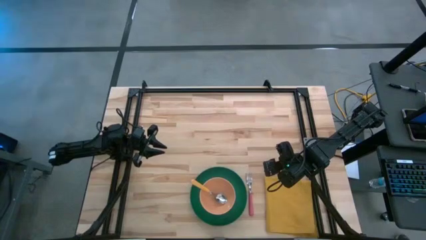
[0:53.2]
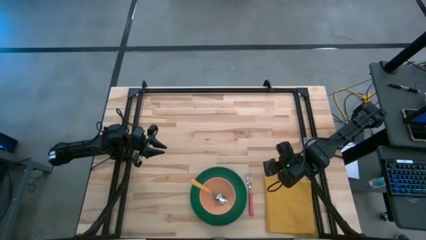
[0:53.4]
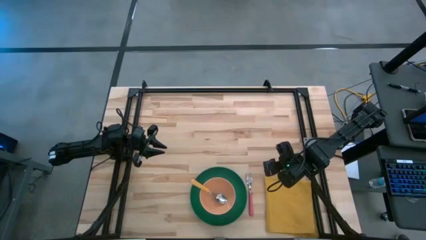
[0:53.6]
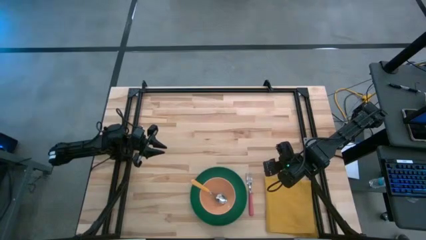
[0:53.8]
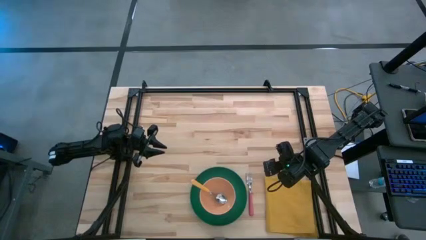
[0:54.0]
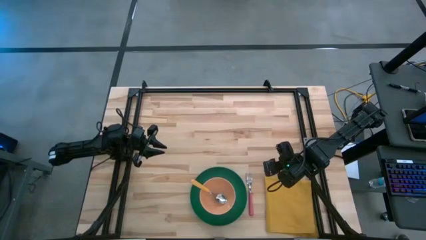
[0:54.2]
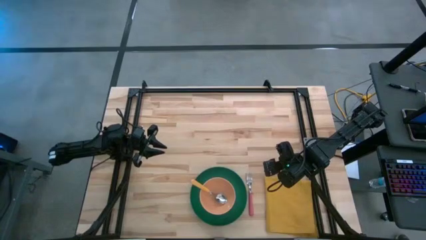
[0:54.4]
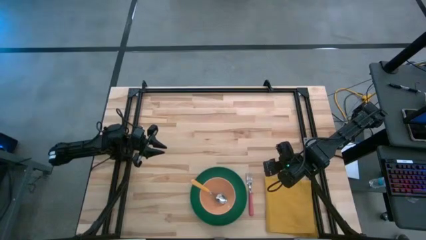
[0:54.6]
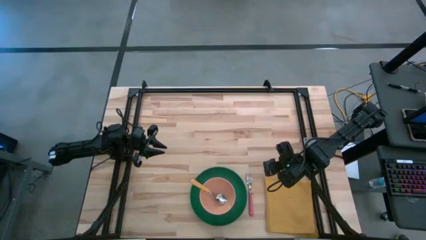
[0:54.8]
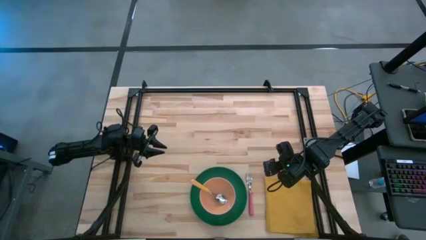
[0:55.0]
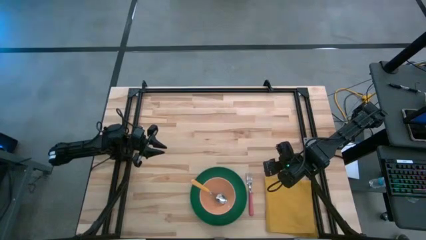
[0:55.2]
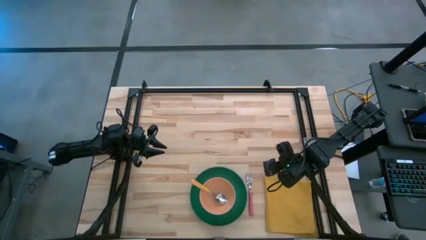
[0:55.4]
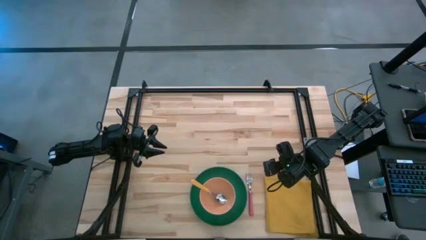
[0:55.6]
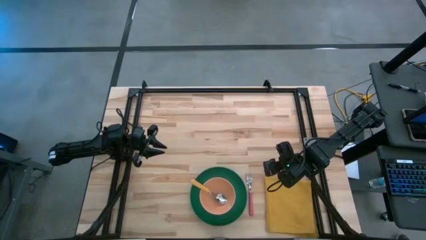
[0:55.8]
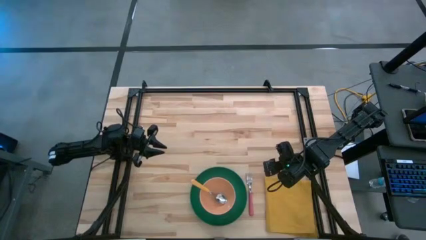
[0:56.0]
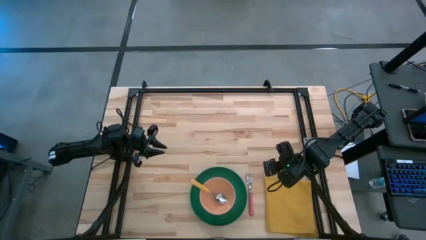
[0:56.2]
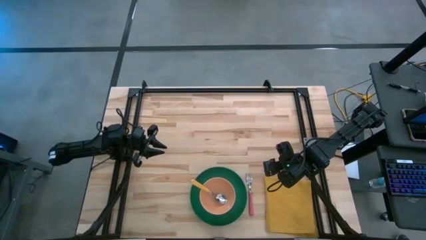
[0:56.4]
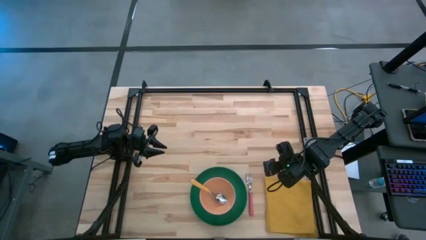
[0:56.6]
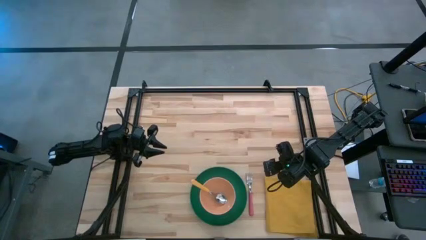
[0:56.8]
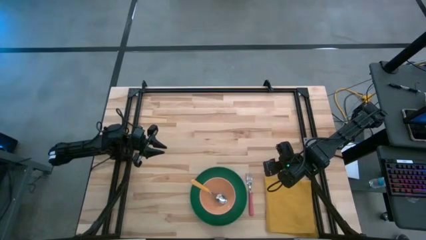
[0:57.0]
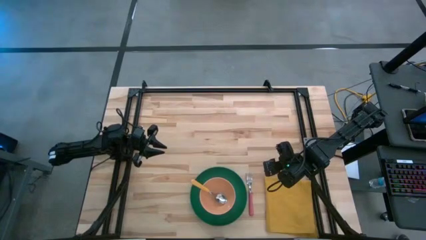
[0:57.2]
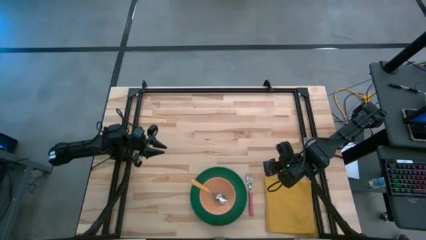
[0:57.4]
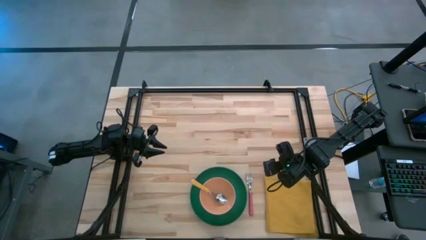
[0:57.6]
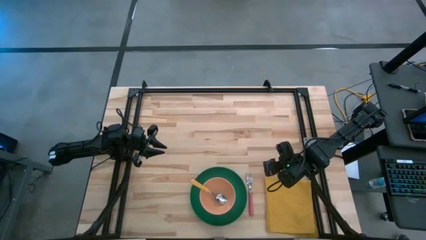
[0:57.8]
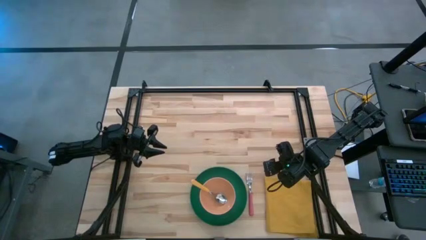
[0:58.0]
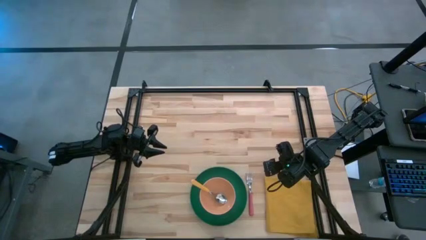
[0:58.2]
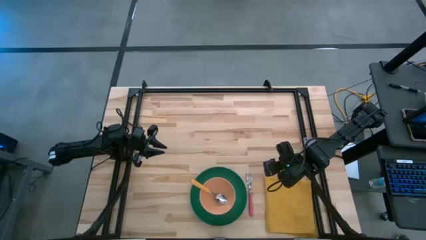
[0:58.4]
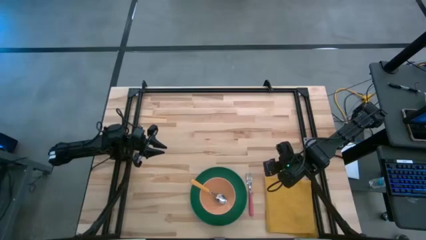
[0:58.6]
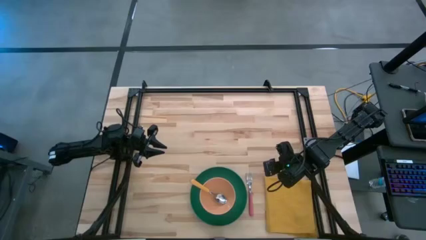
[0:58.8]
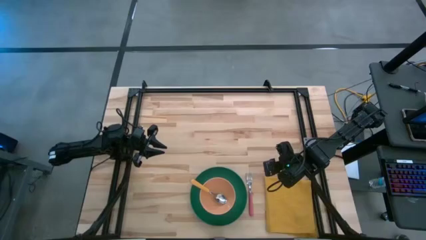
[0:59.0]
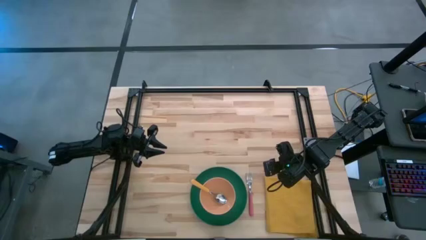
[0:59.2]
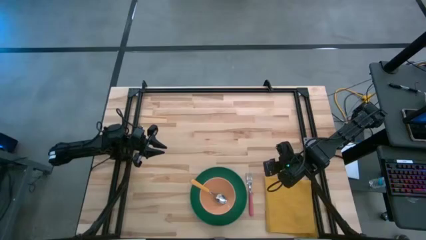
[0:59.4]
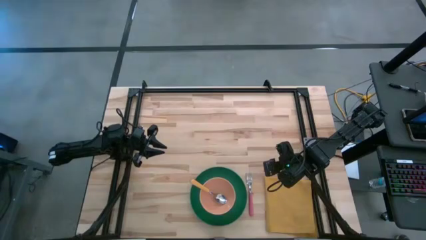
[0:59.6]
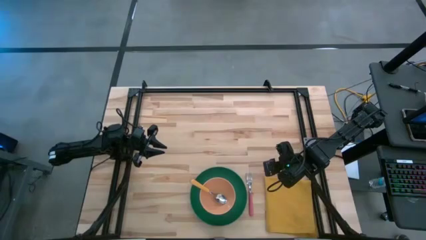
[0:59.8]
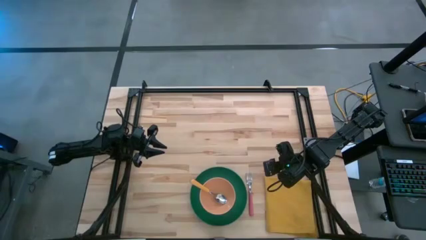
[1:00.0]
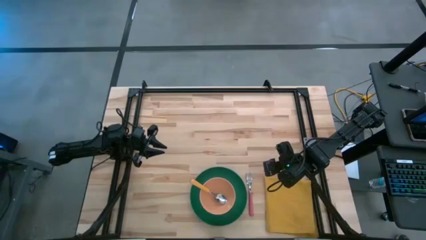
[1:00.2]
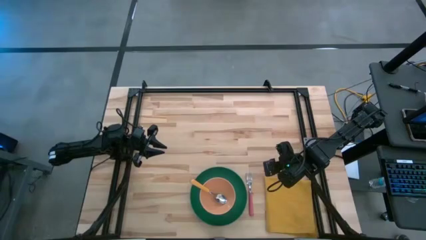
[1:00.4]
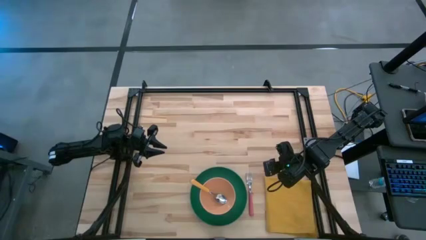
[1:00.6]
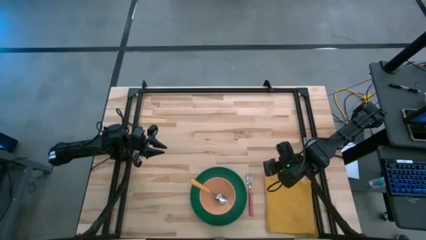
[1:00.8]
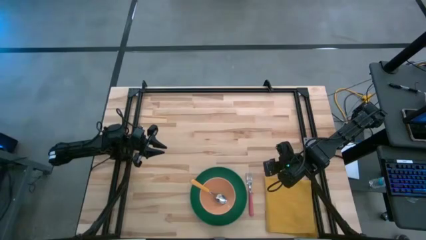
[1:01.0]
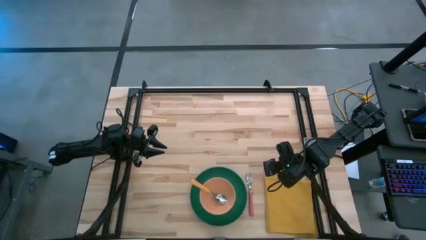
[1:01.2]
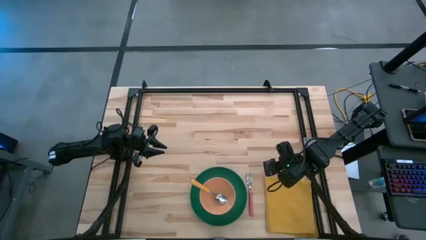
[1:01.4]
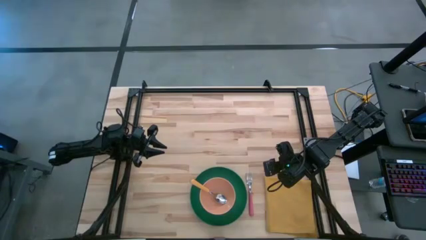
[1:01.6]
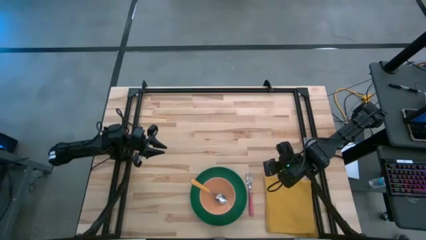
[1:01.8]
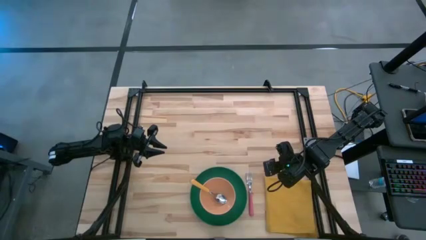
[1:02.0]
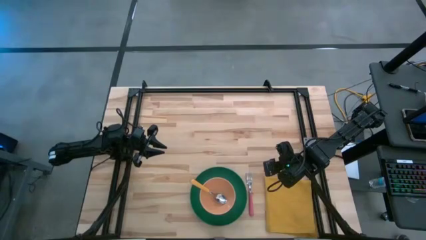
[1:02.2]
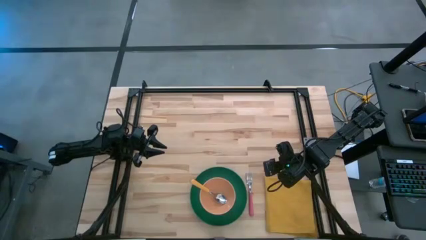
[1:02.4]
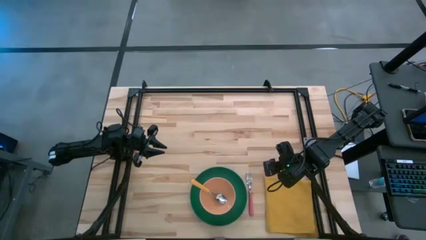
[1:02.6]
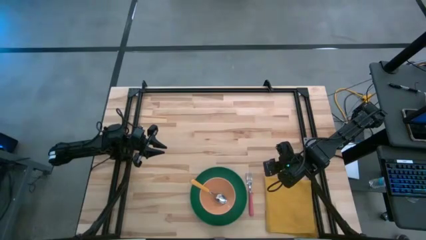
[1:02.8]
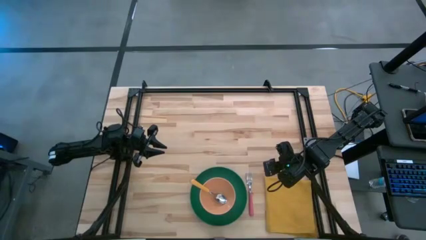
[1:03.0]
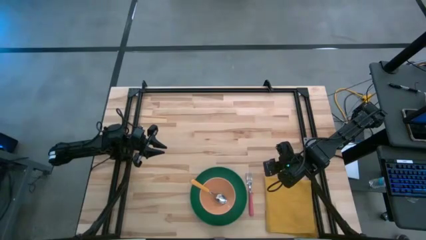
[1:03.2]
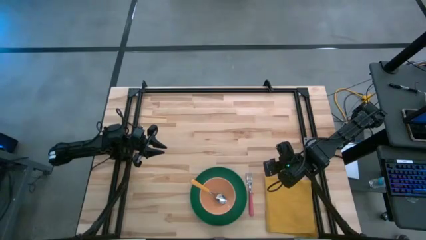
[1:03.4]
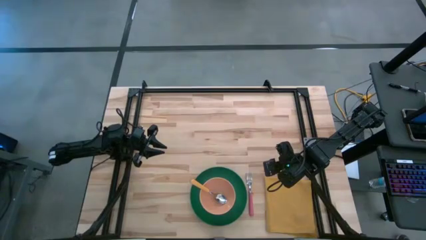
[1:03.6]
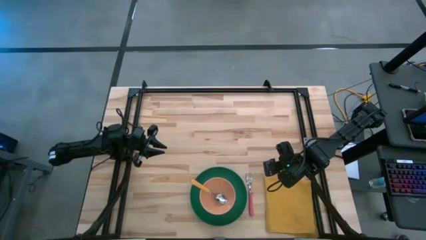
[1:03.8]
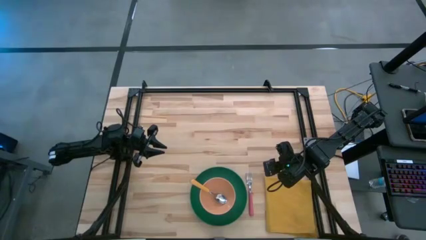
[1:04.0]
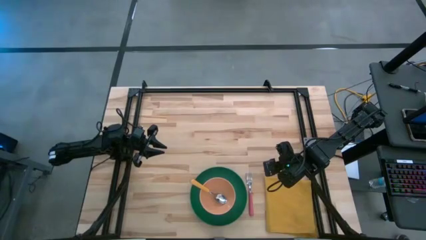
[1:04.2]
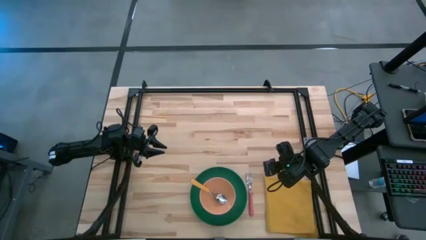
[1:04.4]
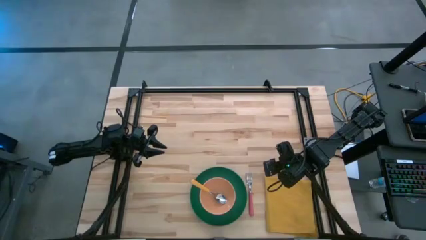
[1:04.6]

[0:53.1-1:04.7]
Task: Set table place
Return to Home Position

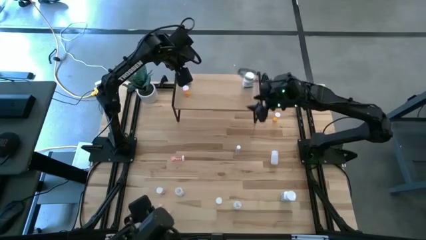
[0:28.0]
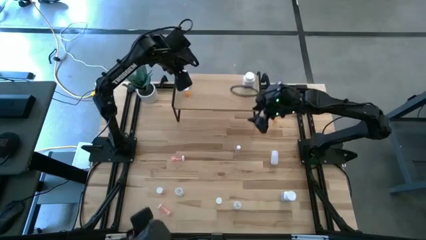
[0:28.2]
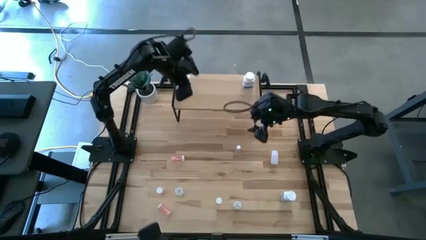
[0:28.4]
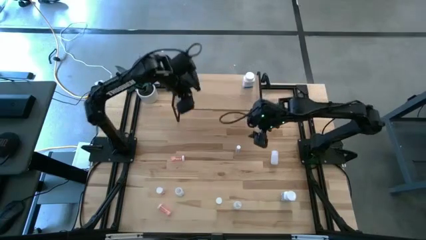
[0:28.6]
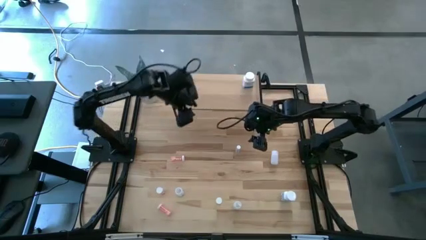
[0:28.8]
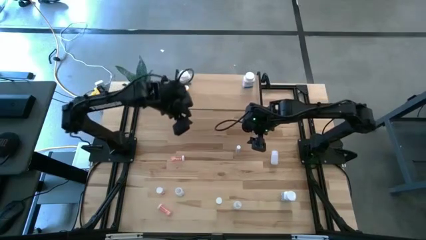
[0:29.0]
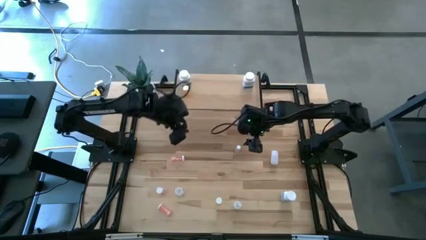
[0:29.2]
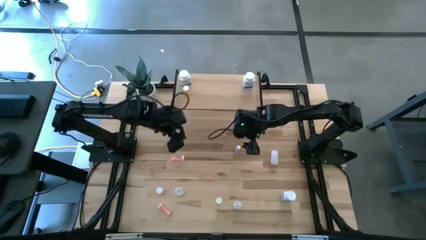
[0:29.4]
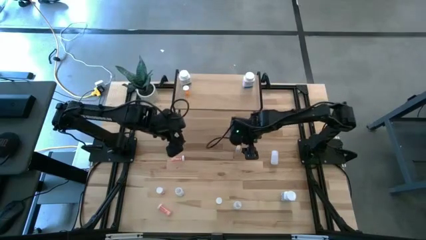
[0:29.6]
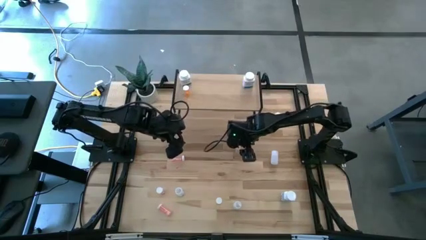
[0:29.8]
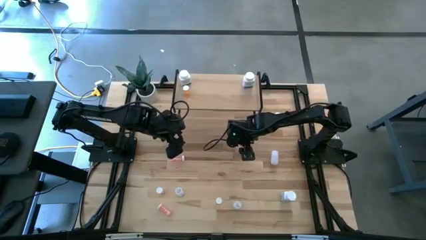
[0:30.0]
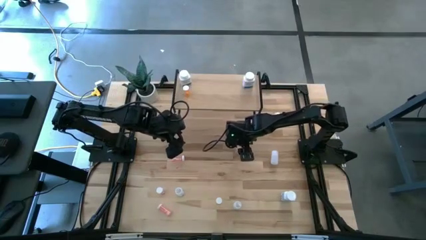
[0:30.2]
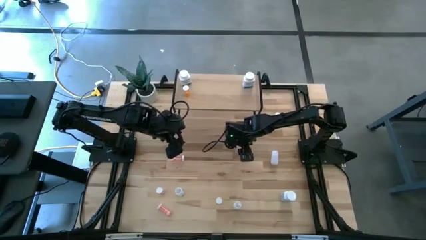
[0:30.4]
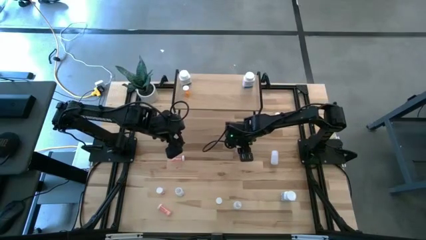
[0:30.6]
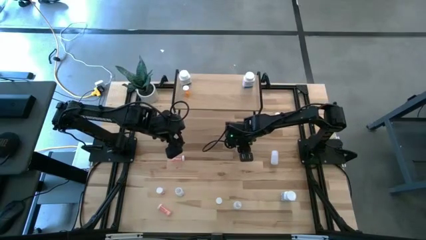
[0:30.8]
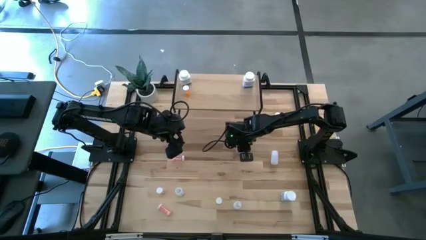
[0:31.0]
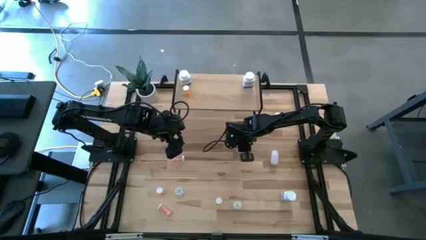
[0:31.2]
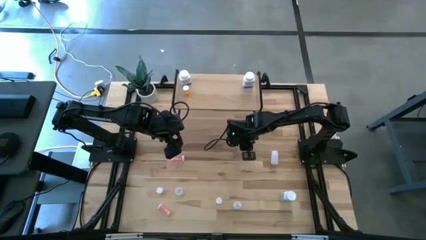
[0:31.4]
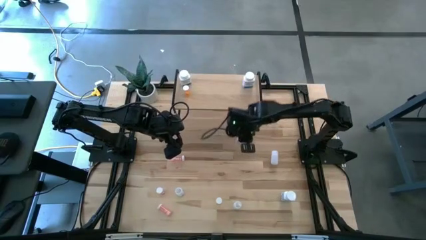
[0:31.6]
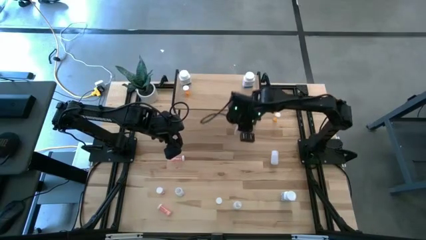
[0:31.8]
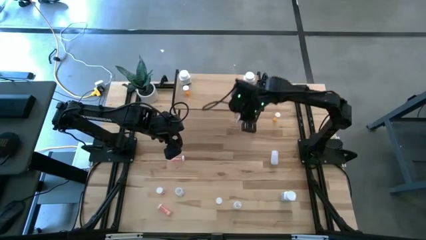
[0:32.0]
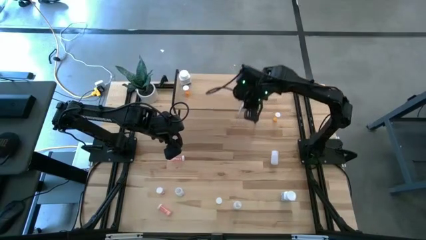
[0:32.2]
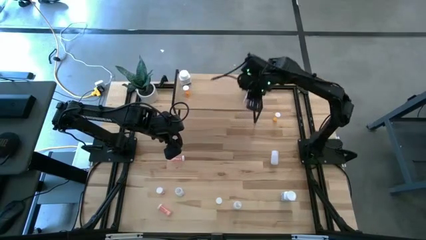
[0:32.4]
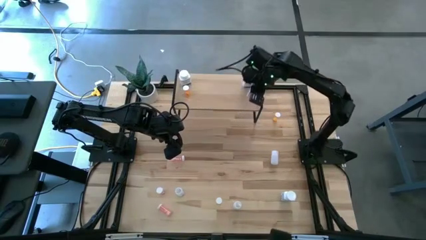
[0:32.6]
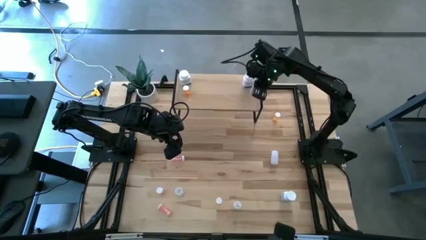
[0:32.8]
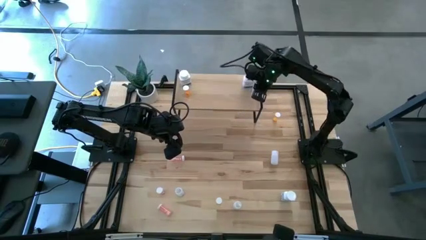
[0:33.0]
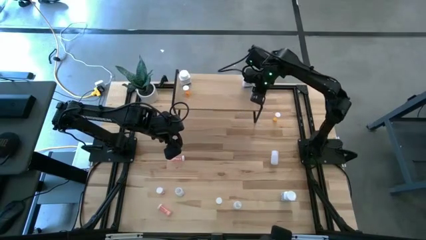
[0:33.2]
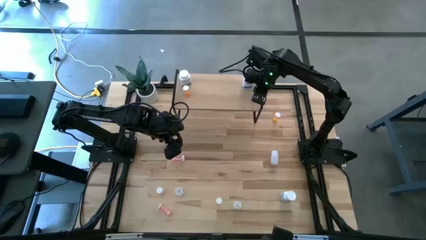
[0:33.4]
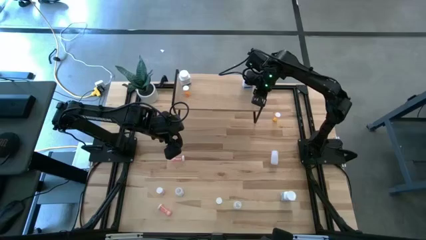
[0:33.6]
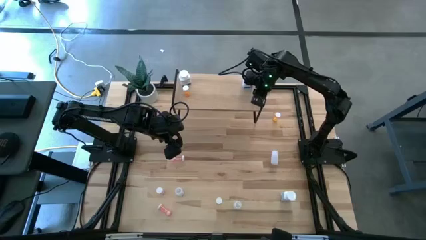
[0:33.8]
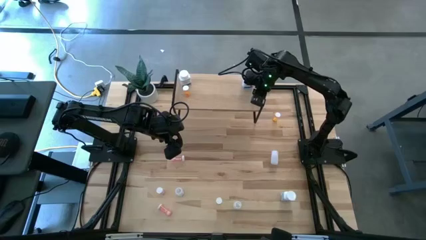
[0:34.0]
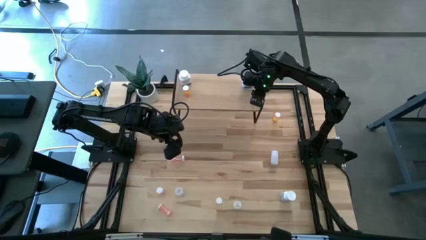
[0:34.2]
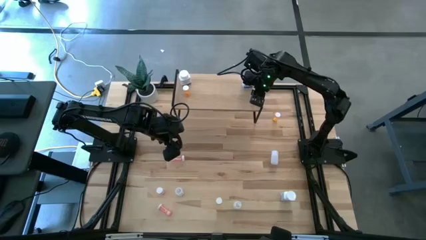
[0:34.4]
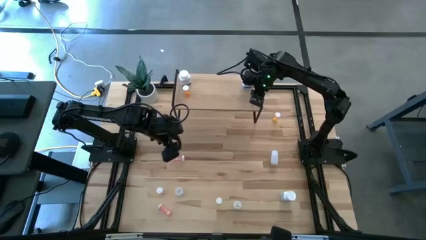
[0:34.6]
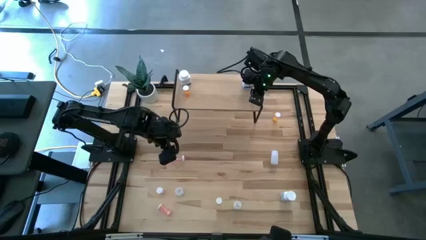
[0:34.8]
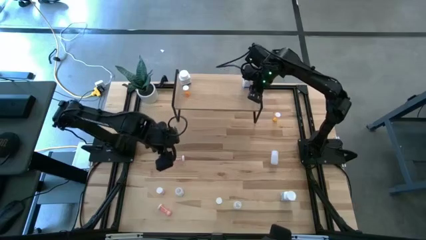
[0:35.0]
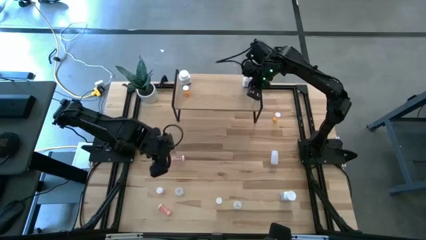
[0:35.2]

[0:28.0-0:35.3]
Task: Pick and place medicine bottles onto shelf by color
Put the white pill bottle on the shelf
